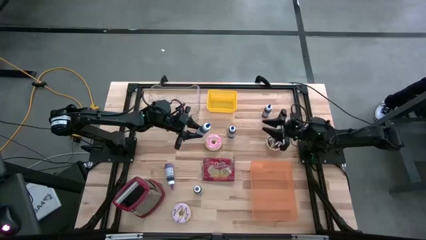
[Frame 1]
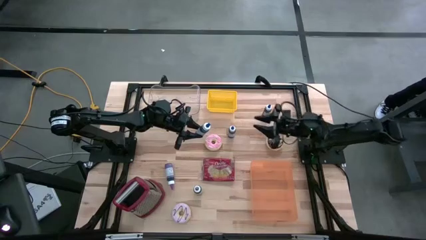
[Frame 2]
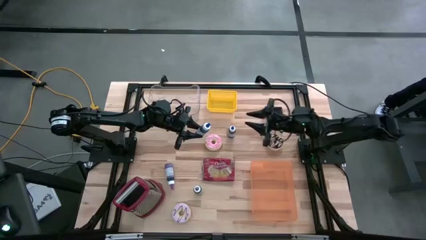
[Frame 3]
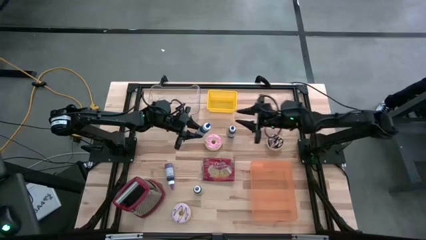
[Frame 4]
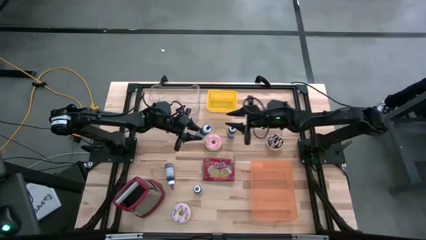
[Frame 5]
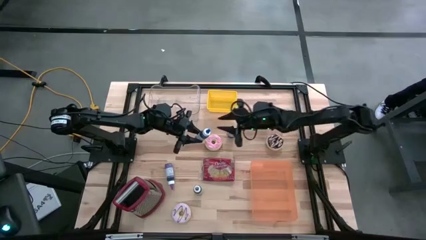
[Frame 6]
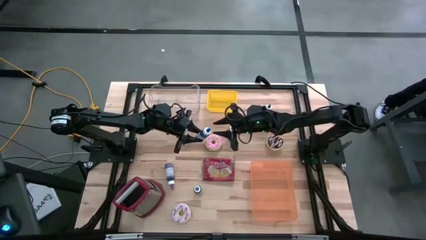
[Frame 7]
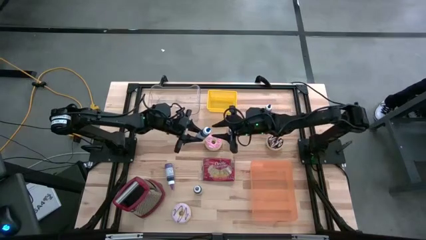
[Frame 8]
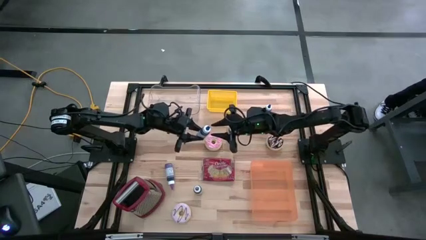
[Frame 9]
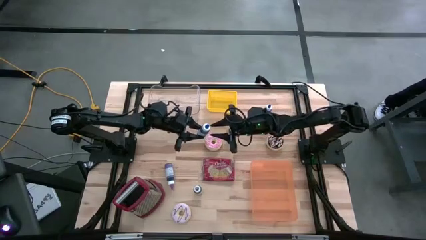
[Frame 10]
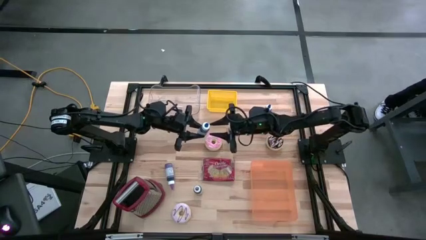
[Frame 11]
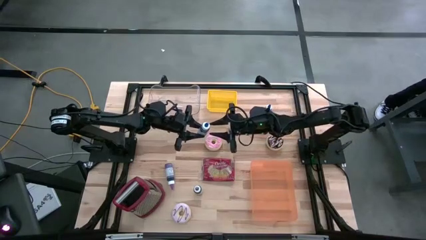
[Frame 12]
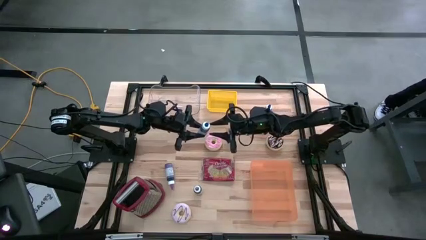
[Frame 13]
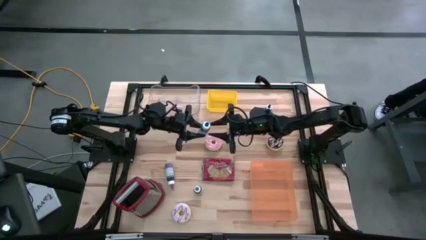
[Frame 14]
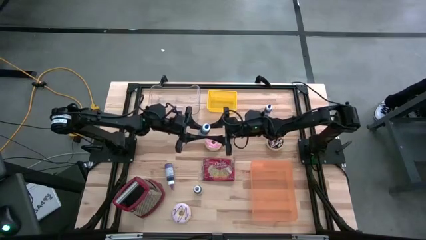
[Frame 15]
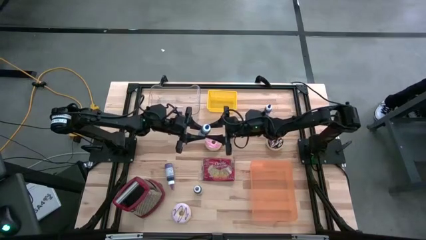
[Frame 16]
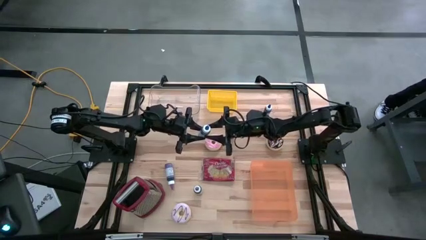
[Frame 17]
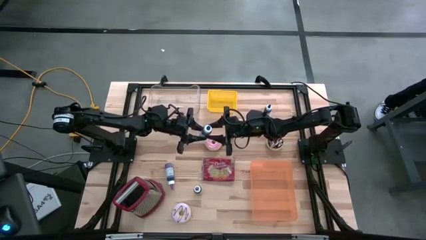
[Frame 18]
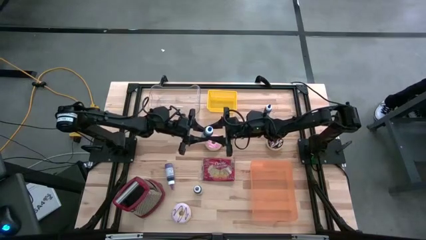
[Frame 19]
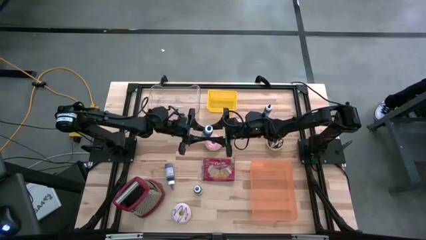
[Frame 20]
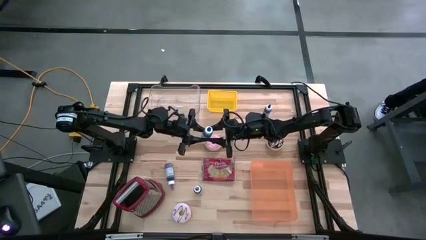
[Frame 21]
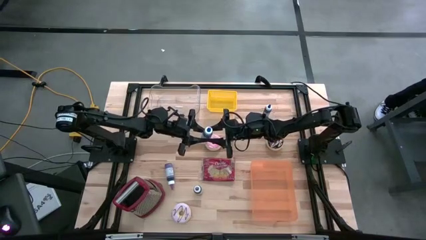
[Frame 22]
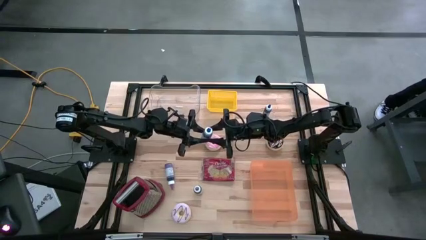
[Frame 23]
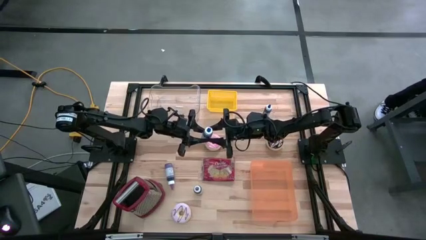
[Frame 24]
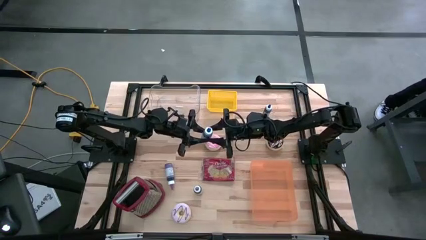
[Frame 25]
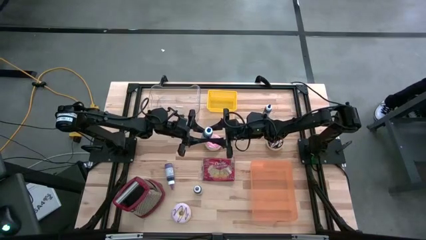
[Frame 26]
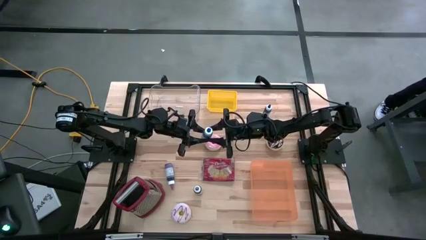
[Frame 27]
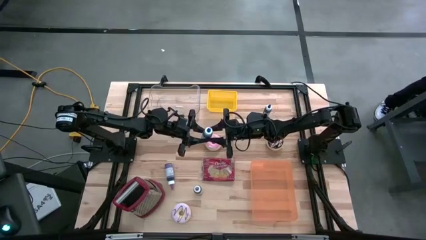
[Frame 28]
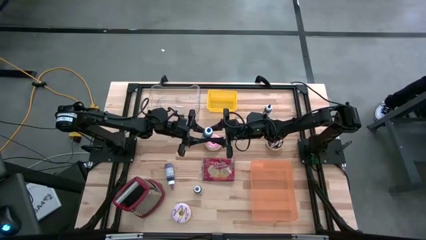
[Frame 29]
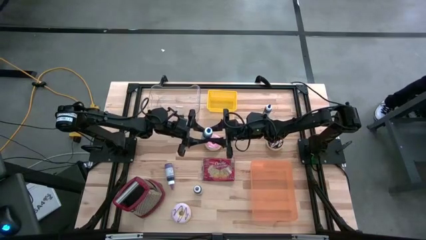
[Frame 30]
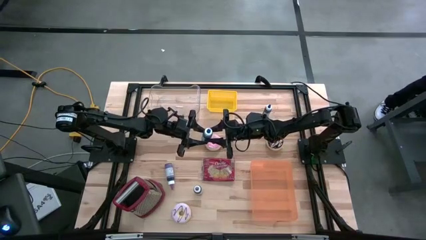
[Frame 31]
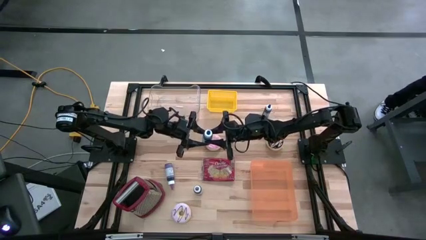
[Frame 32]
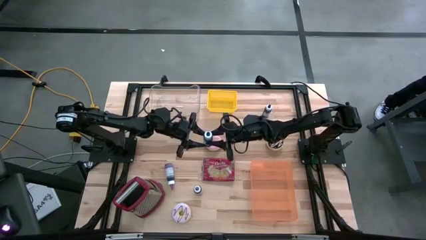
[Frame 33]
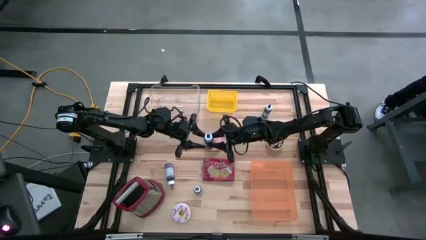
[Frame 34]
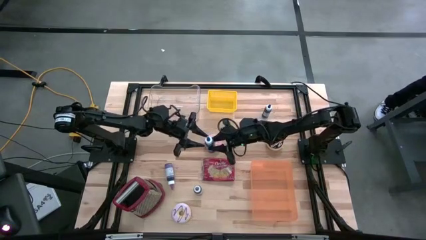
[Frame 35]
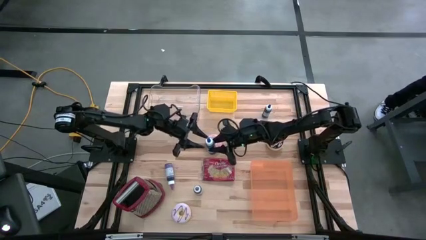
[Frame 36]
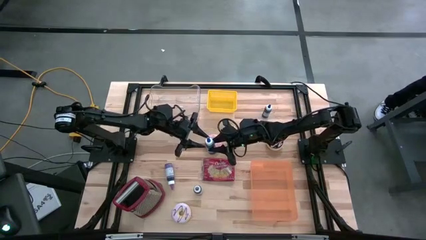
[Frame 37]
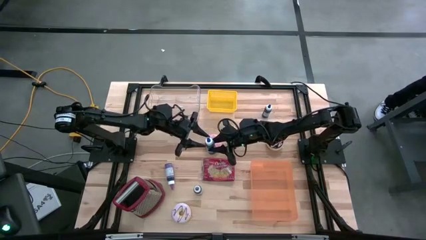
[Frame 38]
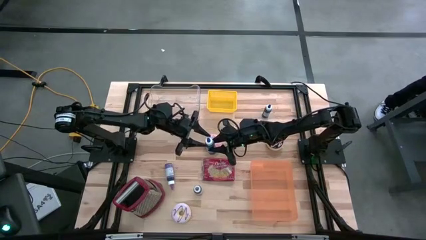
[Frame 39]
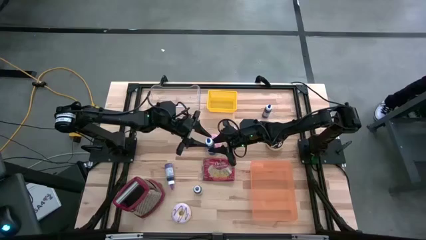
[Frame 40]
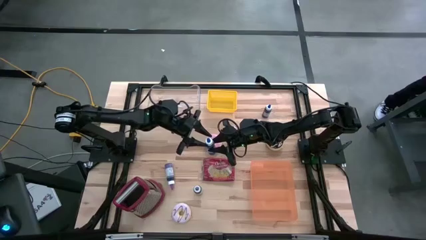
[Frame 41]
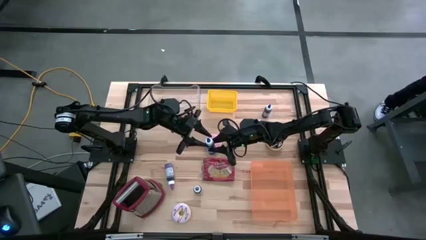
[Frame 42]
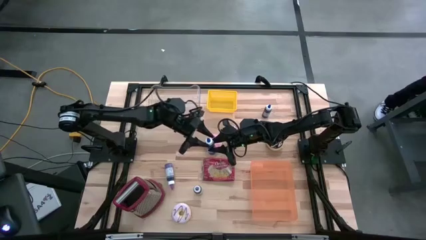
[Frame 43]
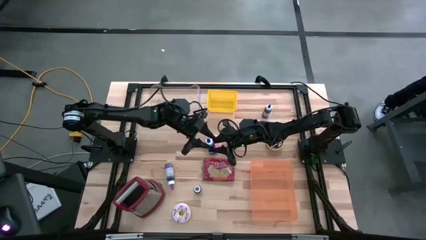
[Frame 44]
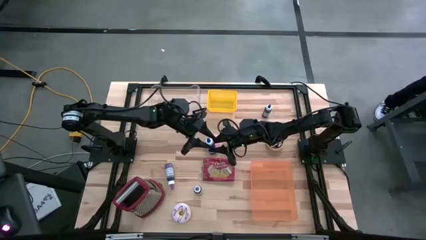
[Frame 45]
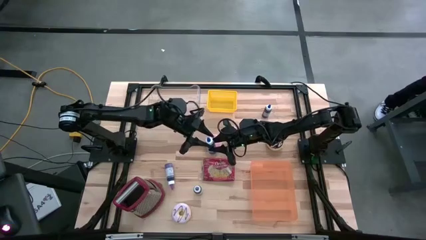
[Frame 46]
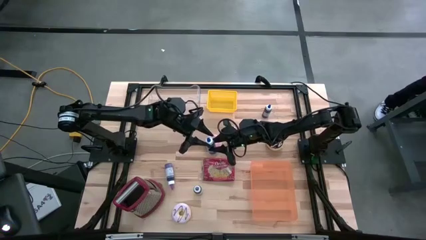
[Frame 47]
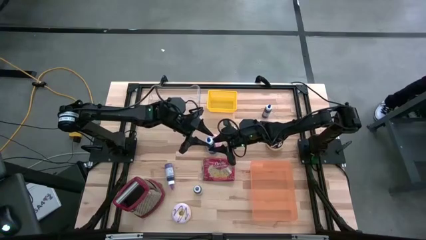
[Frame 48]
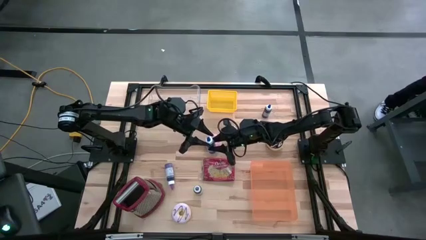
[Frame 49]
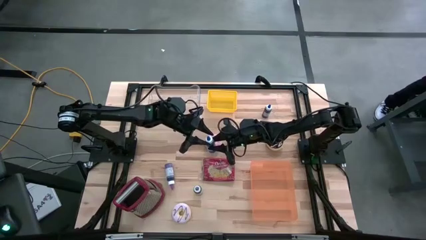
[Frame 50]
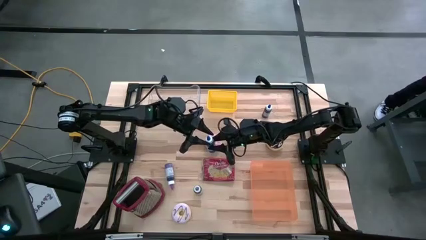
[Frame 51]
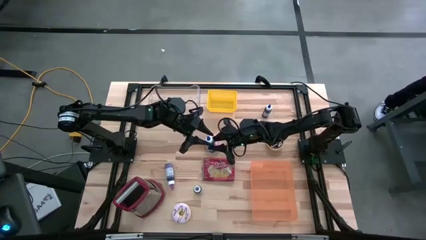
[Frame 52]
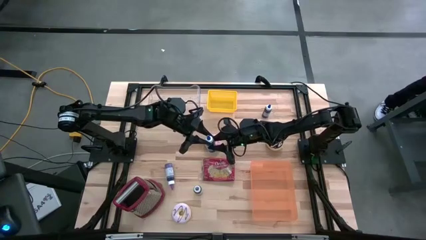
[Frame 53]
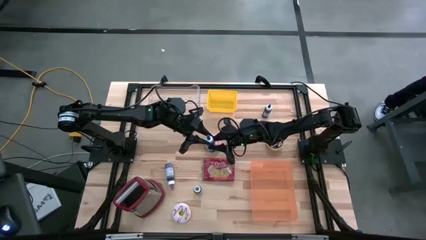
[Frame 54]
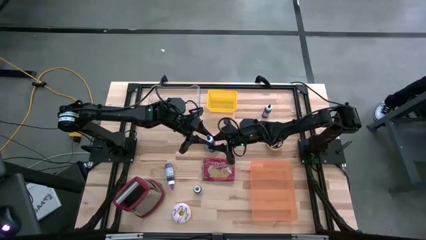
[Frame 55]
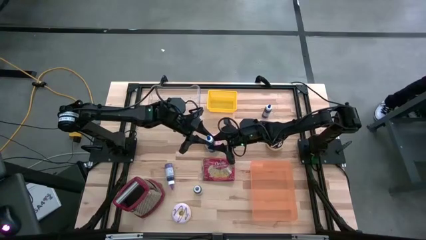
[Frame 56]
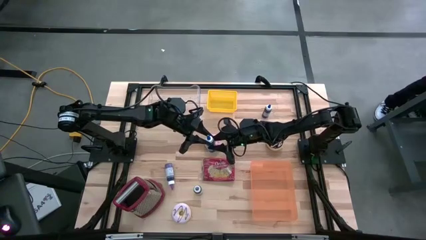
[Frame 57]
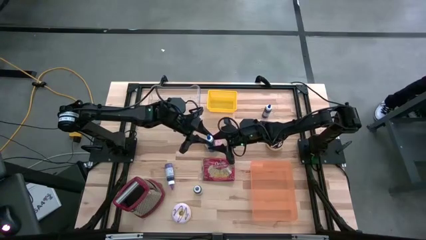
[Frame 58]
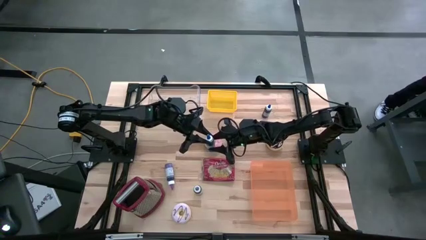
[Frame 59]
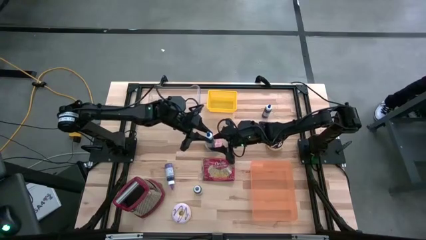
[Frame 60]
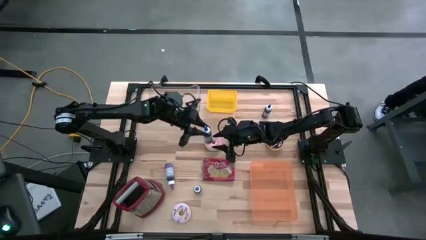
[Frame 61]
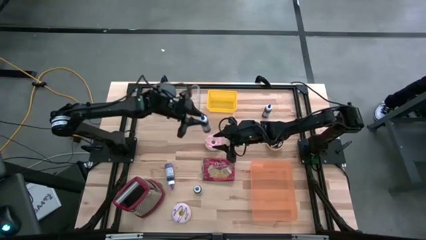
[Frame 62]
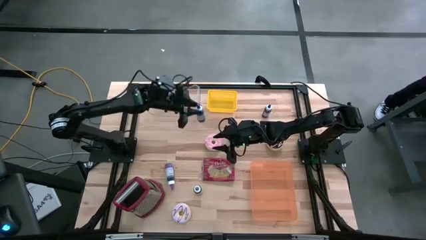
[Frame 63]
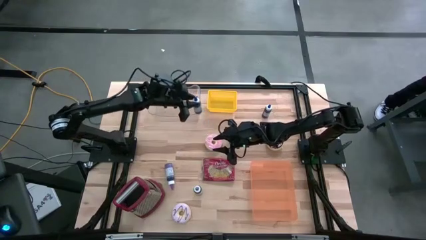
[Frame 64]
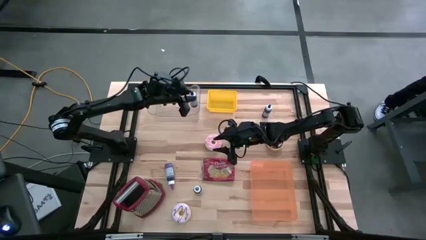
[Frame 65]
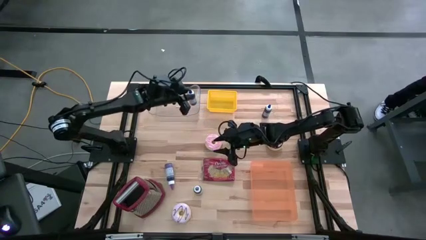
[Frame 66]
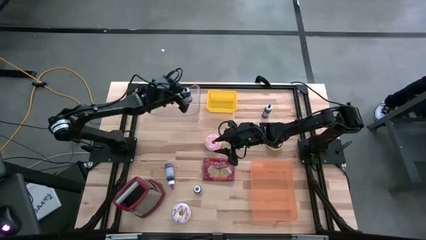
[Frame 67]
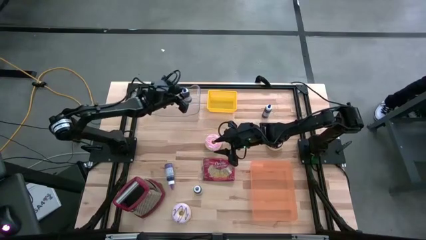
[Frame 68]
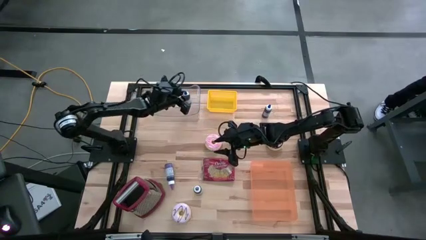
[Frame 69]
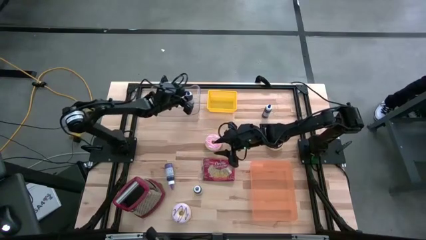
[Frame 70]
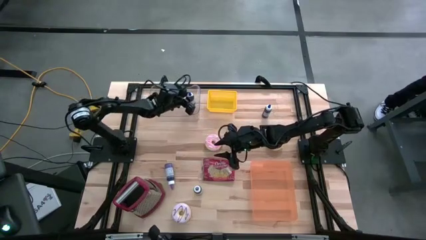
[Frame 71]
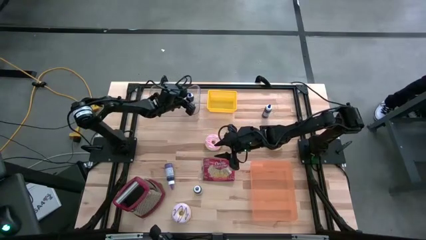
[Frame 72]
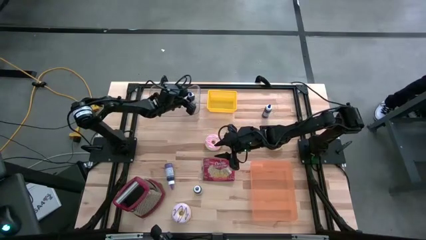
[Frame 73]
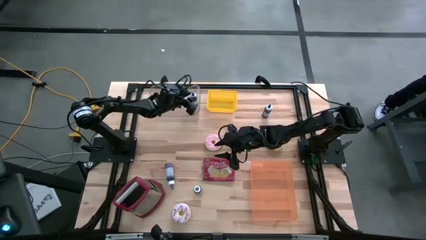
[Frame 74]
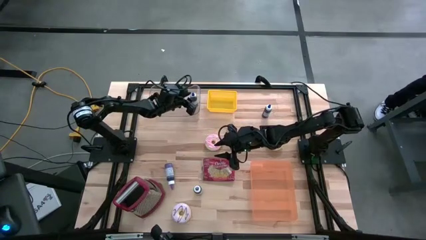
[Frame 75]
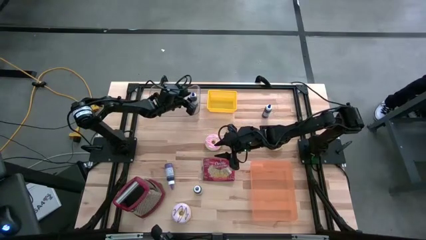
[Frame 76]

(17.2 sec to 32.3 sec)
Put the left blue food coloring bottle into the transparent bin
